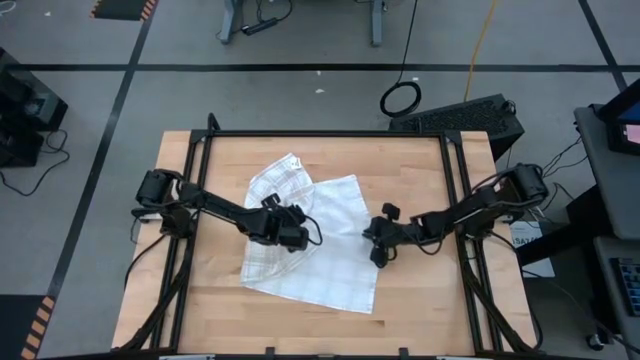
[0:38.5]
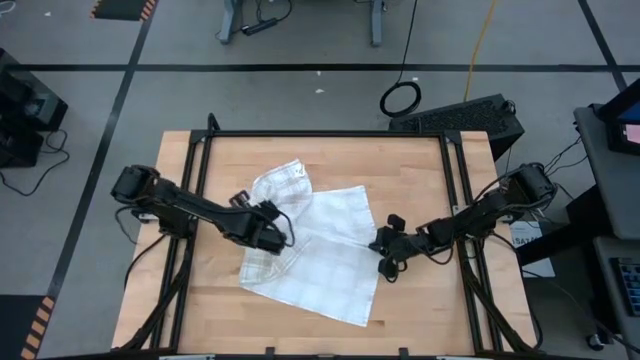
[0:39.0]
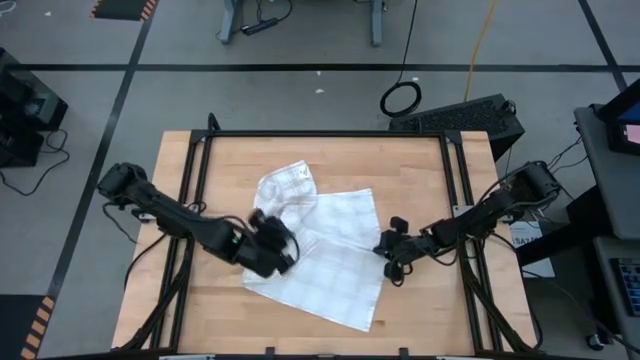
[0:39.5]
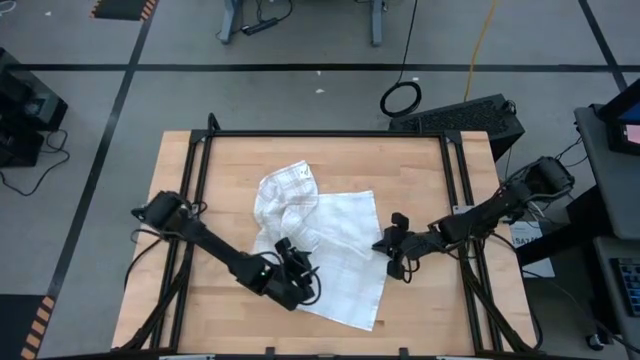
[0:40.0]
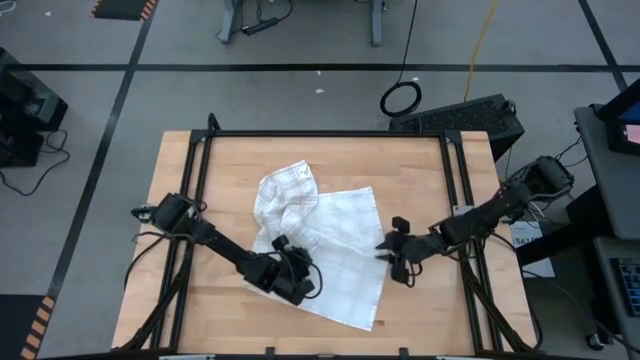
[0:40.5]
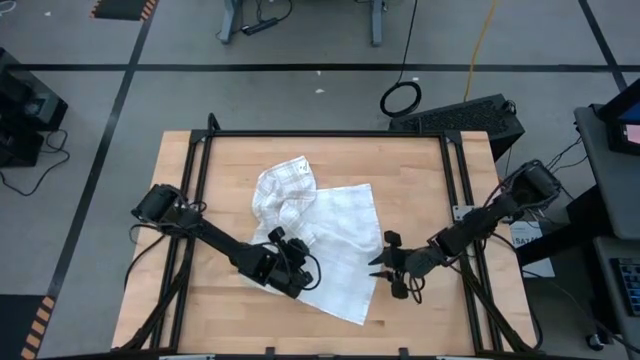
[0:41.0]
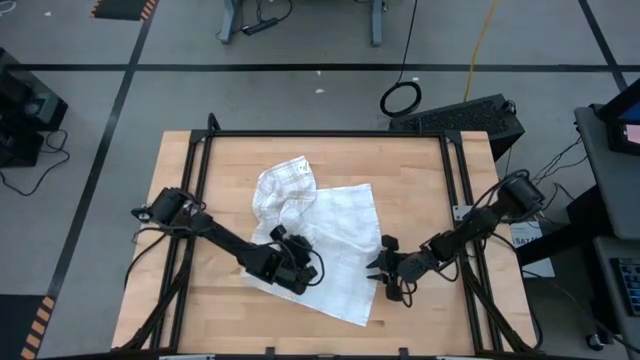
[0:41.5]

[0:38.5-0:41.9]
Task: Roll towel
Fold the brown checkered towel

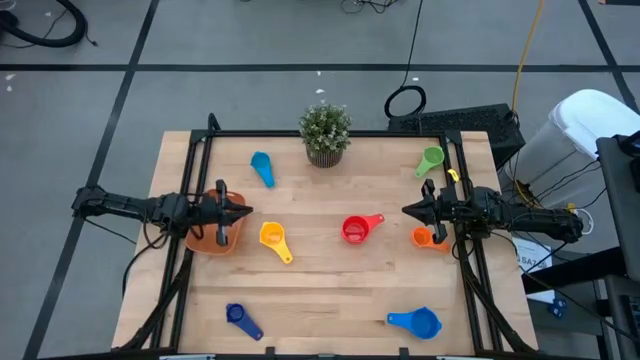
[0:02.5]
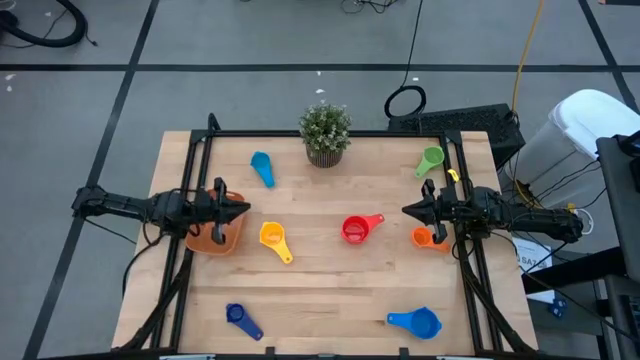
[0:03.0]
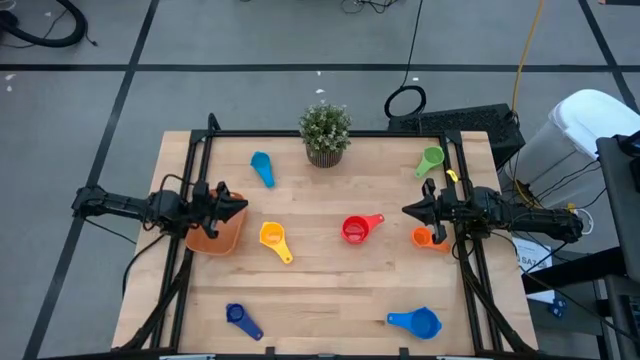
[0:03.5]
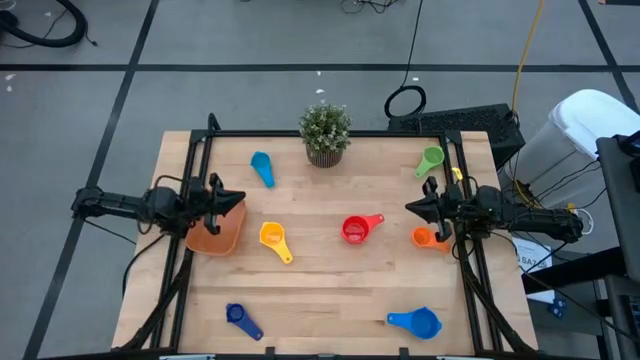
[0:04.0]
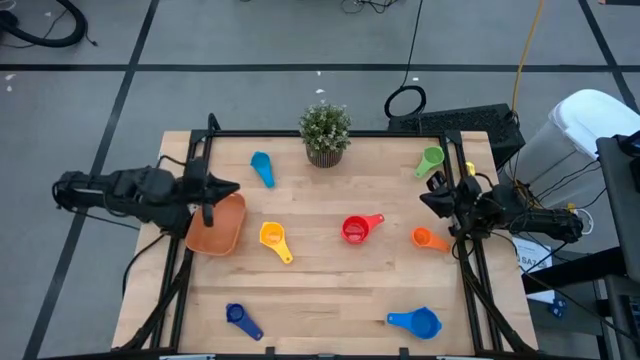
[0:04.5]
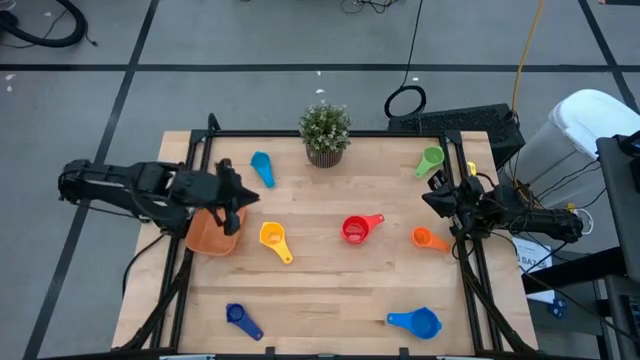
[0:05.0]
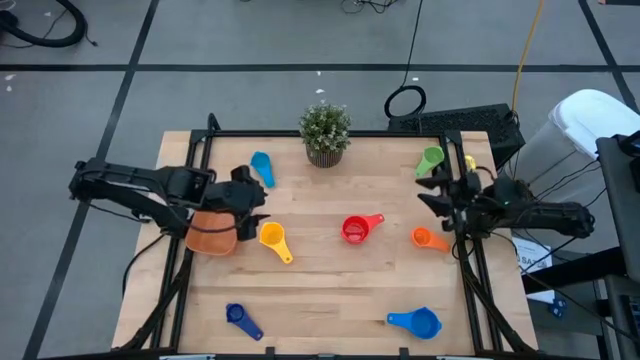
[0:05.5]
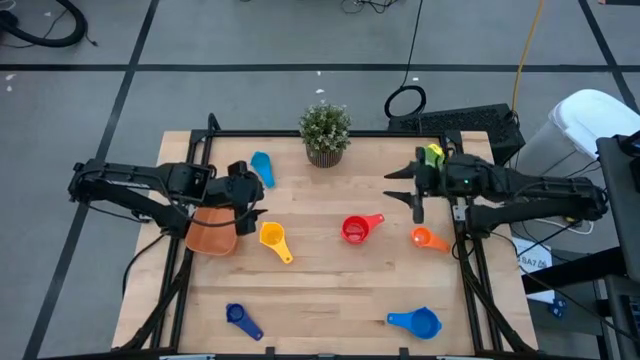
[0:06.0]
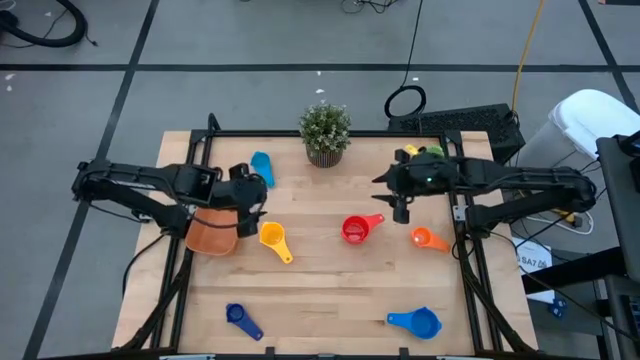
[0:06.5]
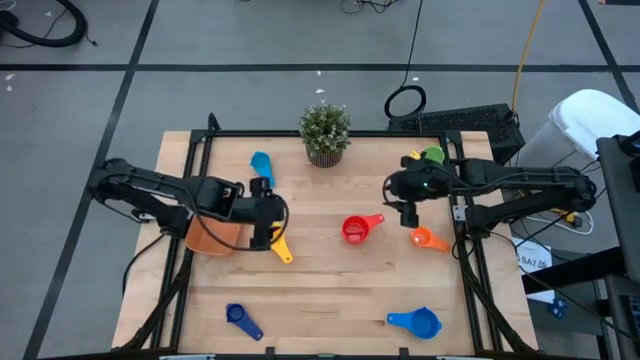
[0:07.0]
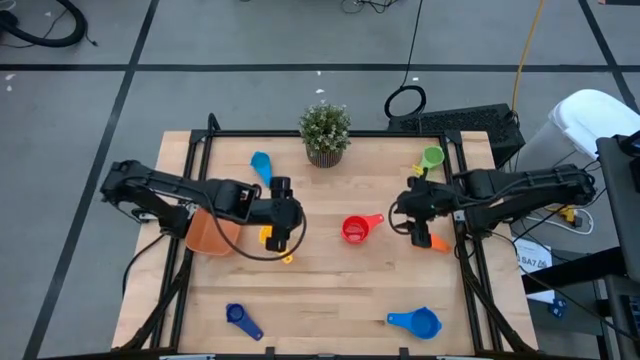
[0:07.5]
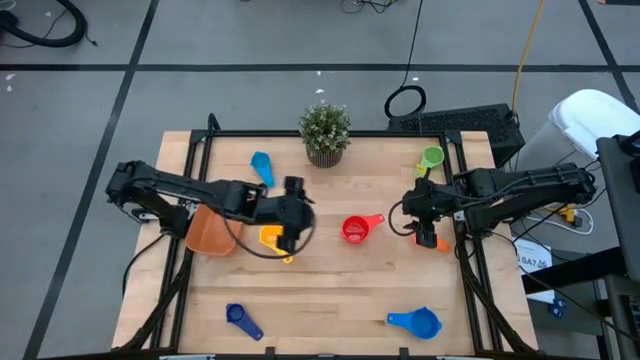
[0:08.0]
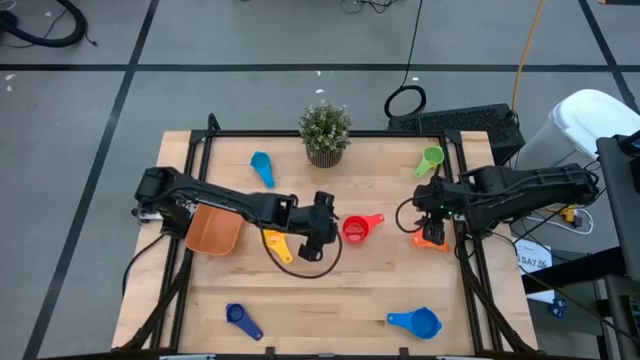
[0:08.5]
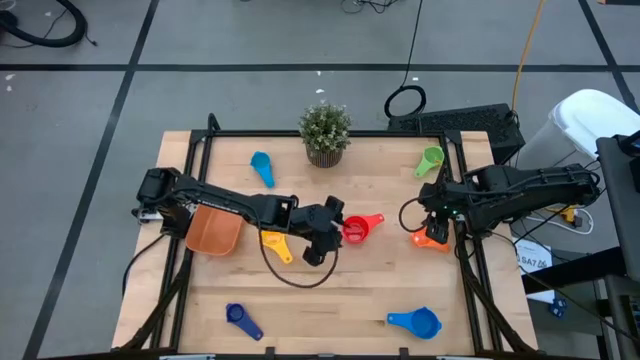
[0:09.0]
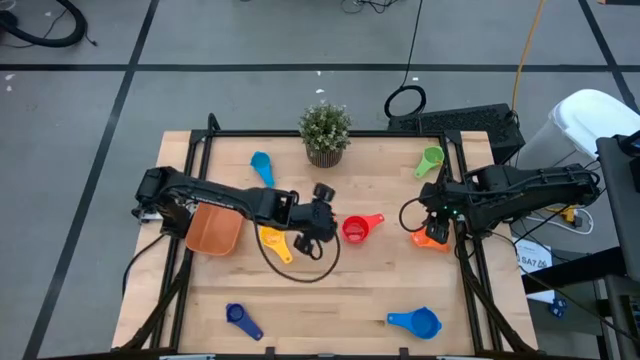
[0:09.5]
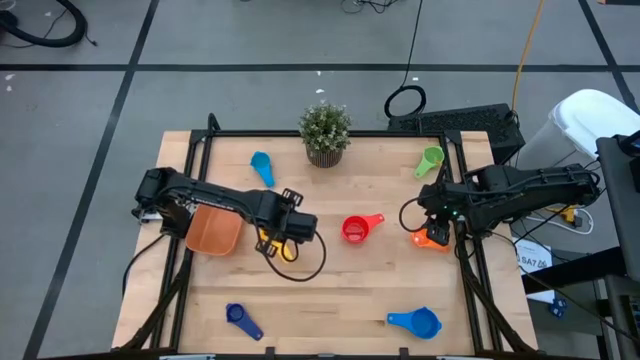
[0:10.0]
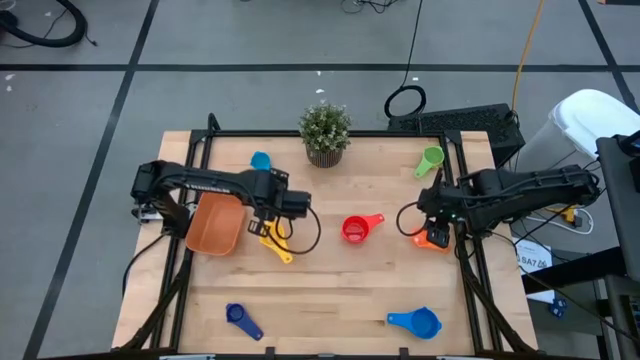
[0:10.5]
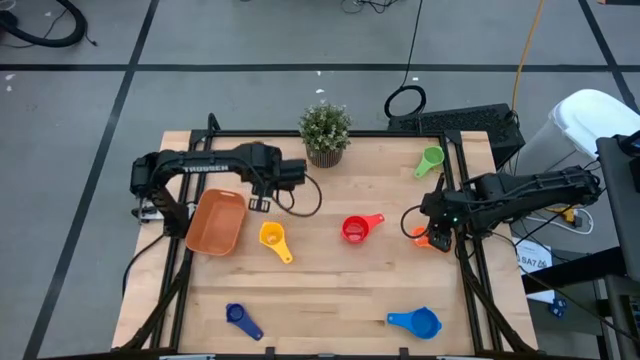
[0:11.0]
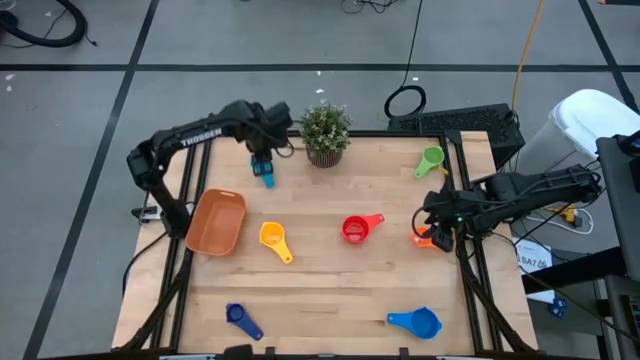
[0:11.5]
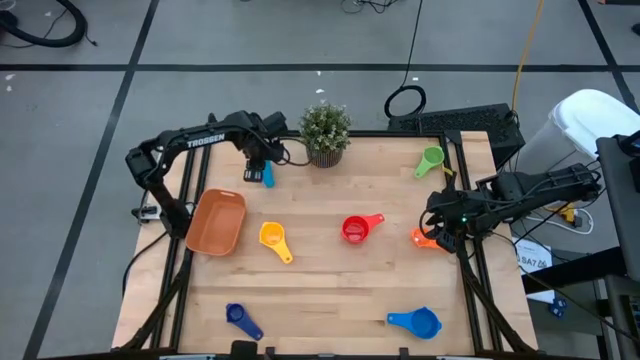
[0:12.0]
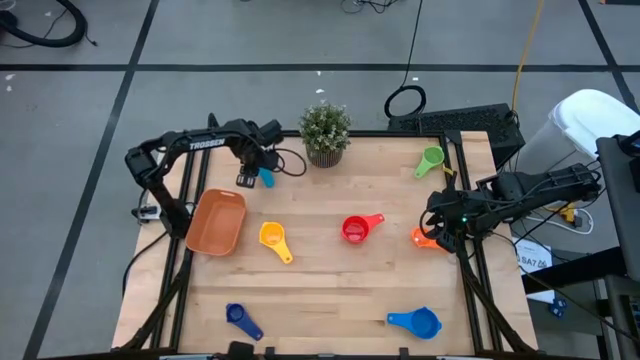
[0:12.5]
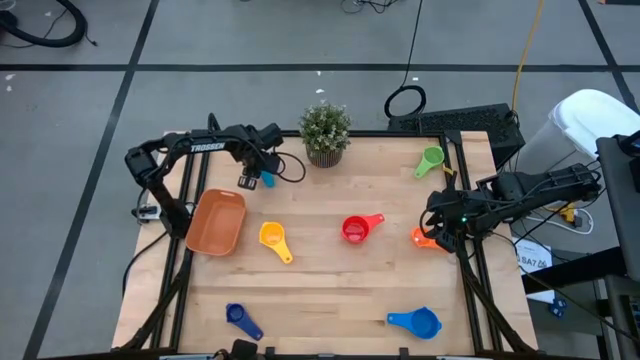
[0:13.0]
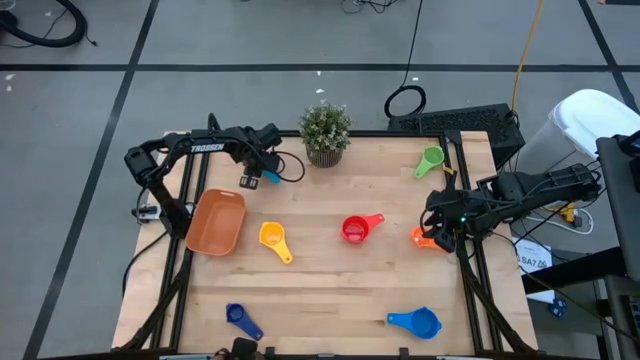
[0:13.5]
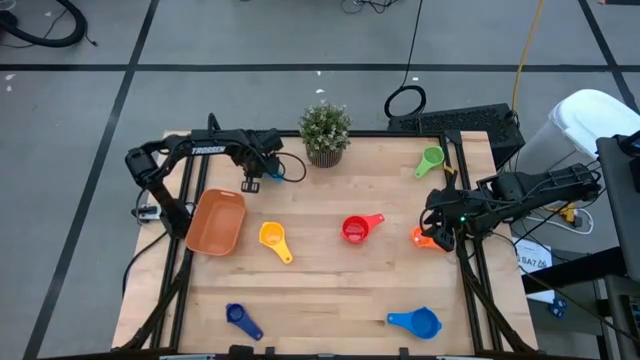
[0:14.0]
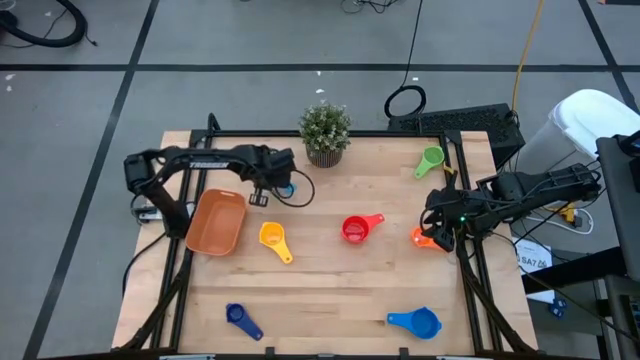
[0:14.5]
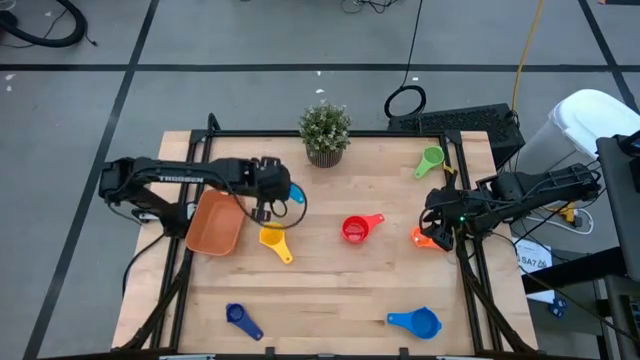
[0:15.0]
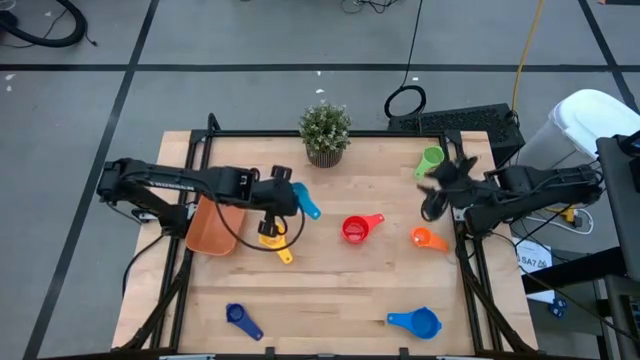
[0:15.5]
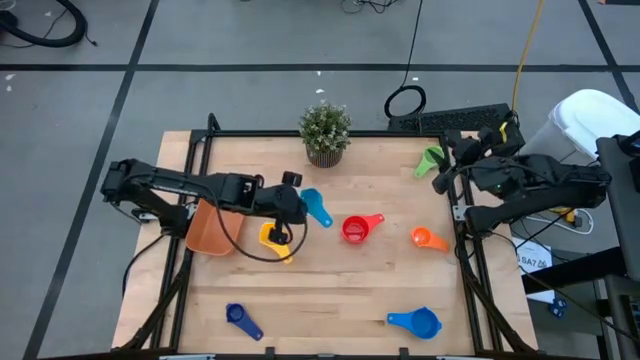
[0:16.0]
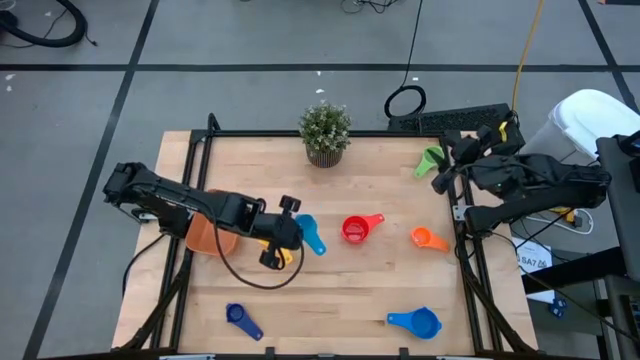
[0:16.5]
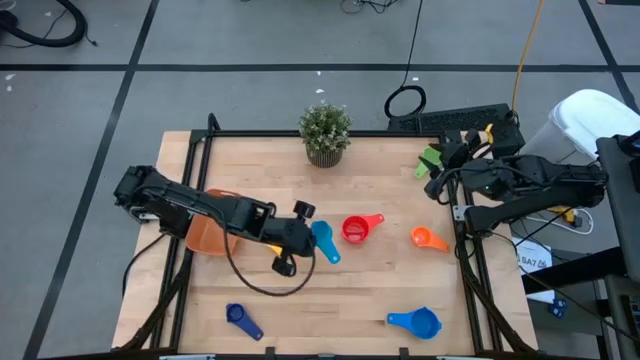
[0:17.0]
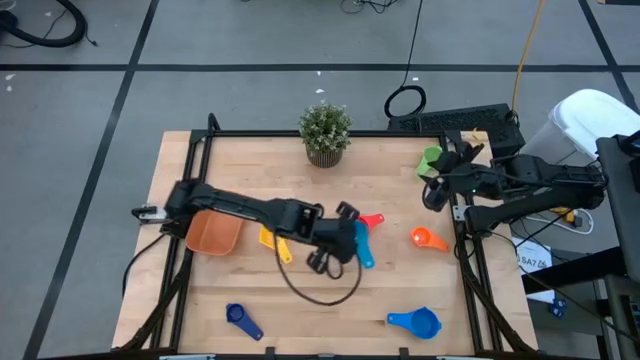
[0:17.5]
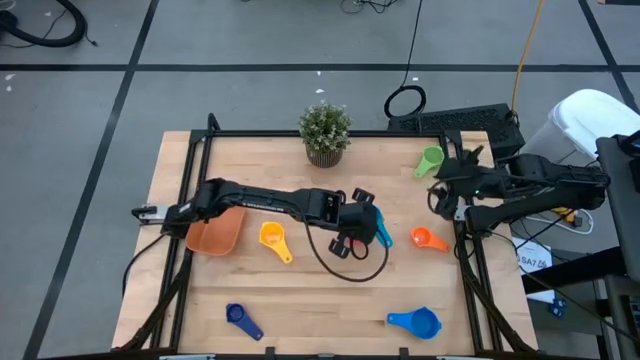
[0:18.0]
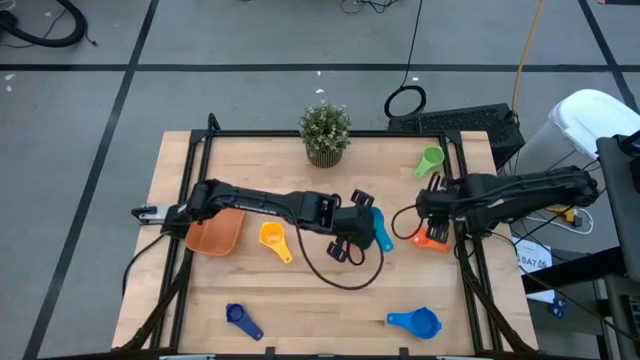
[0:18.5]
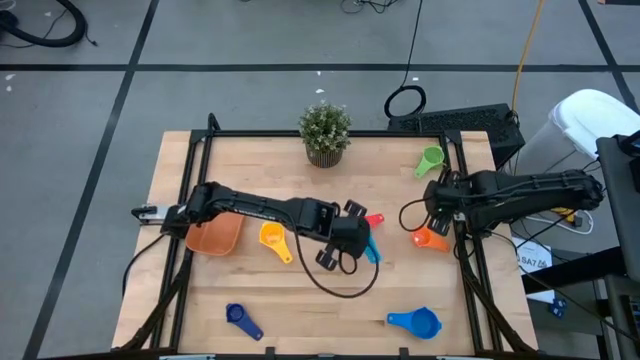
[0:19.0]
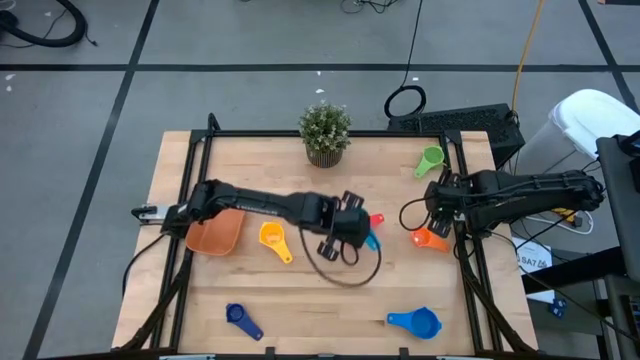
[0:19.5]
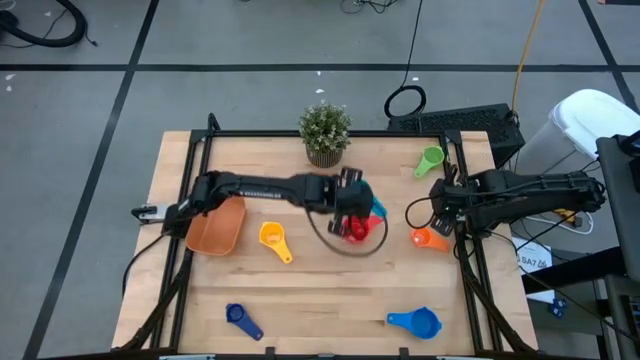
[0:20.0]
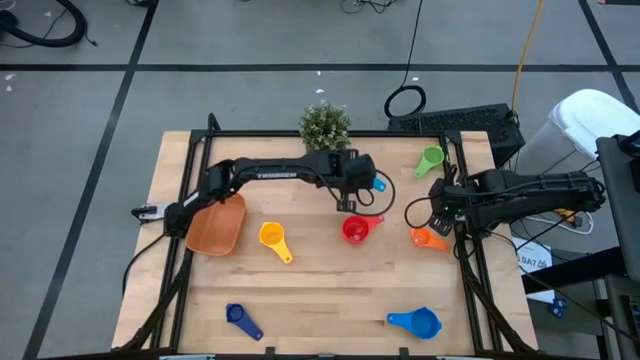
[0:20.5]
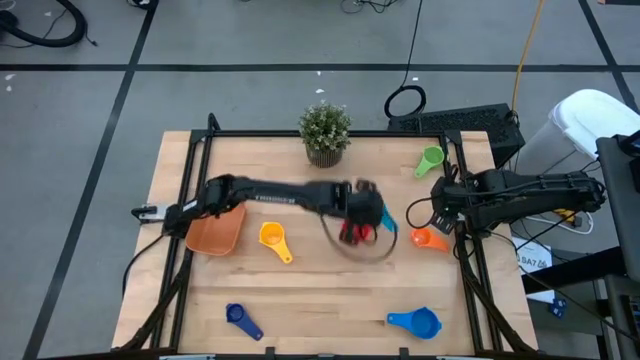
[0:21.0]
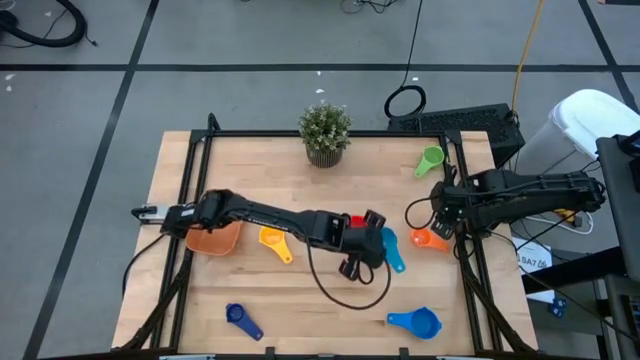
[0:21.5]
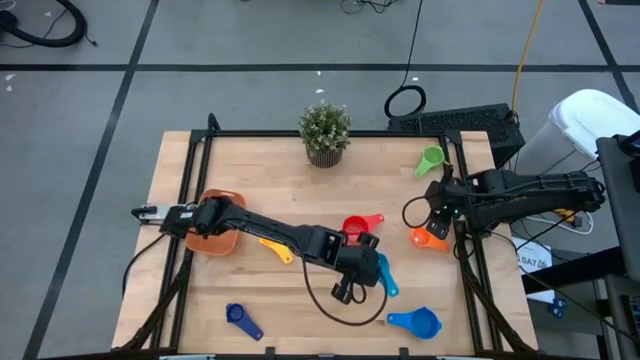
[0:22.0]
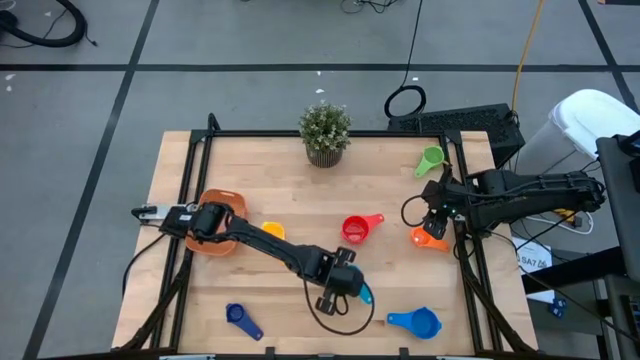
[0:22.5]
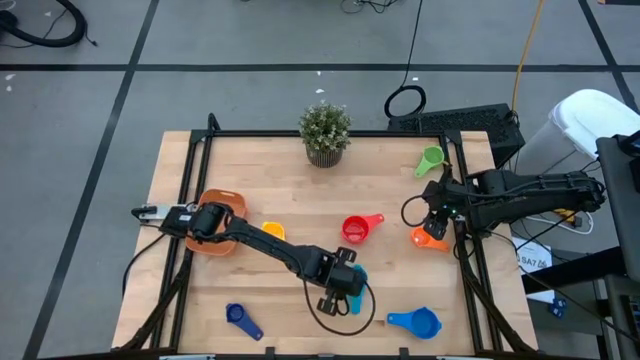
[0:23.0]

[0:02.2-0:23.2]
Task: Nest measuring cups in basket
Move the light blue measuring cup to the bottom of the table
